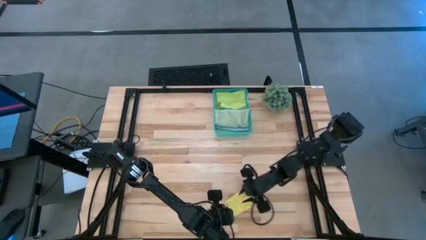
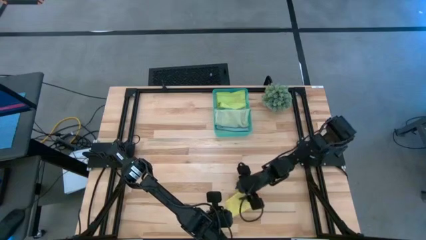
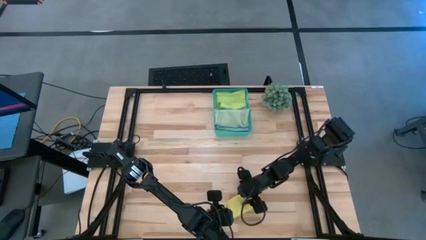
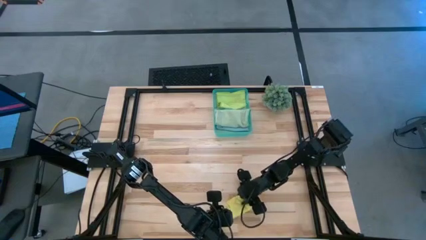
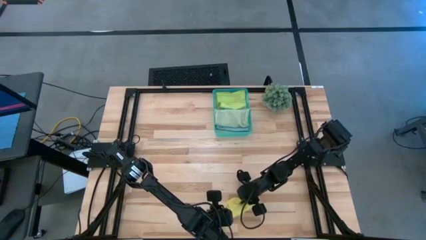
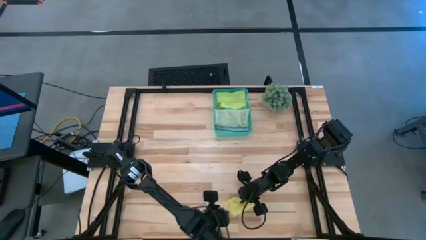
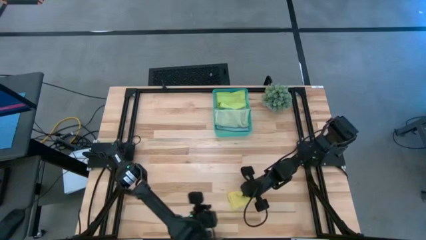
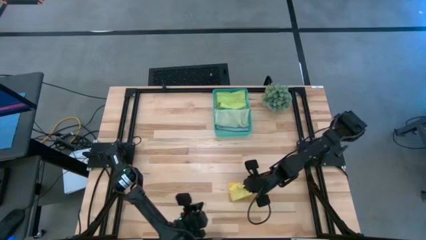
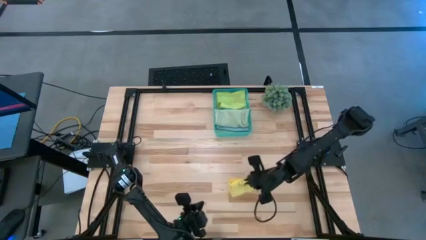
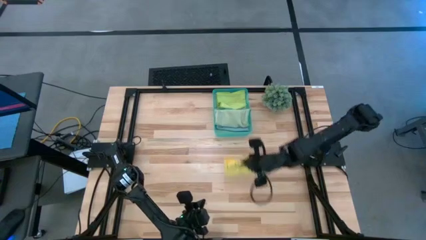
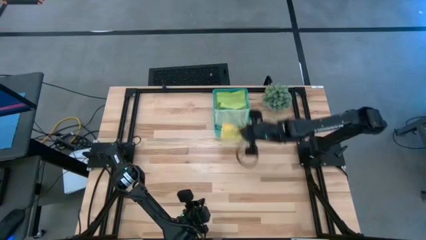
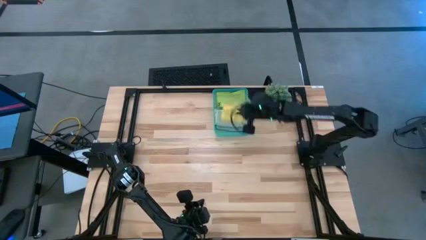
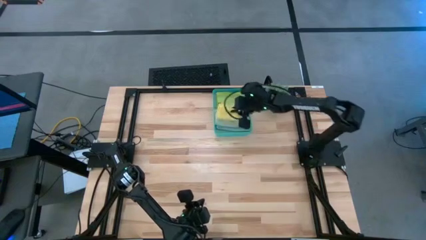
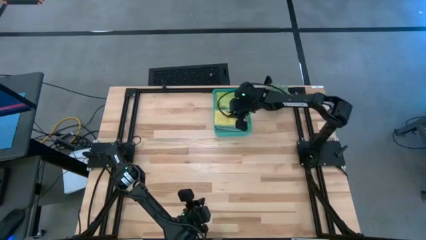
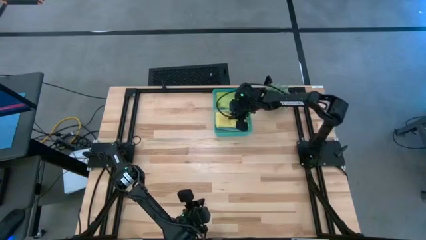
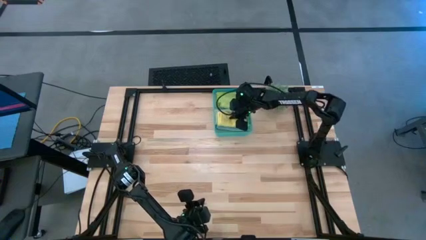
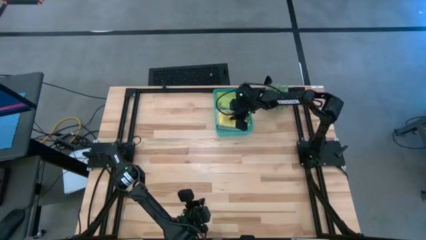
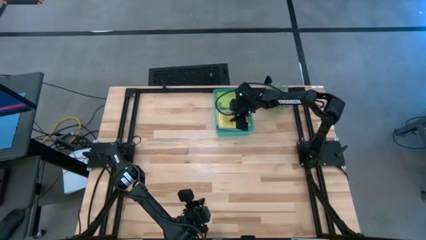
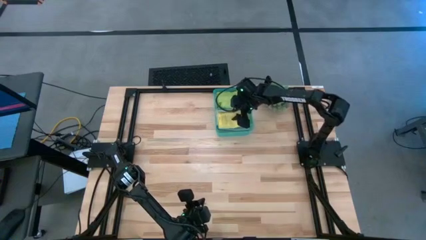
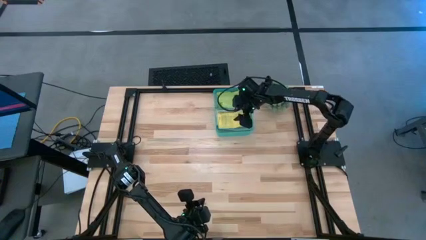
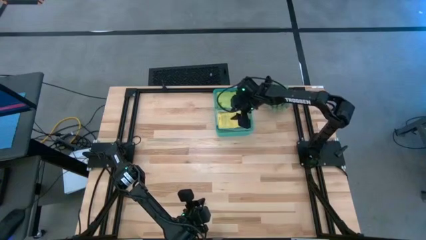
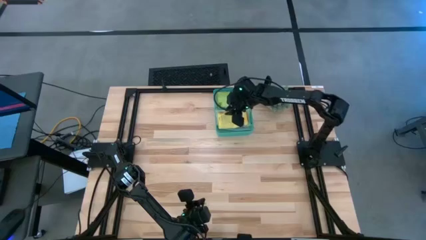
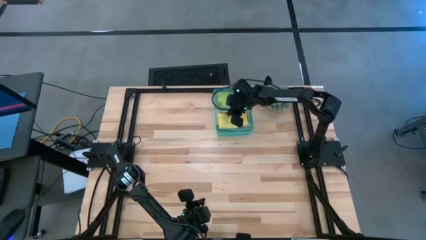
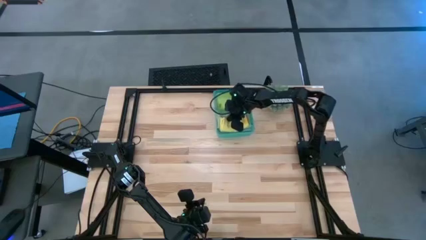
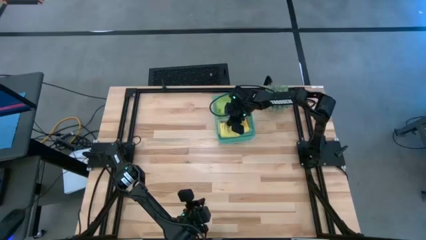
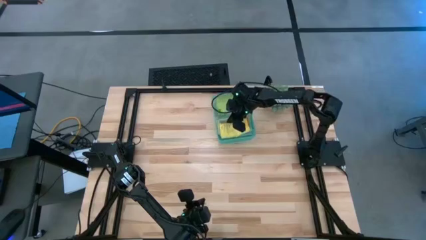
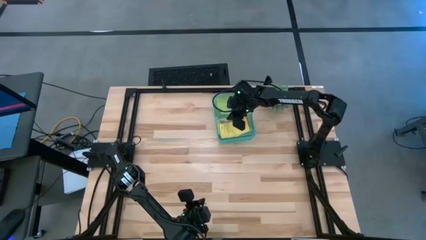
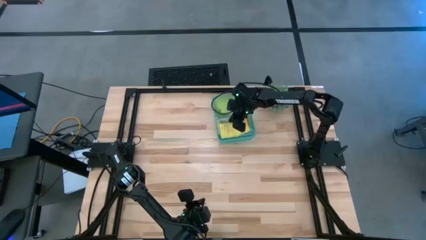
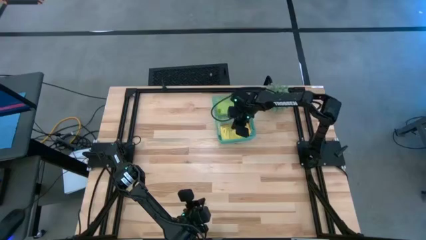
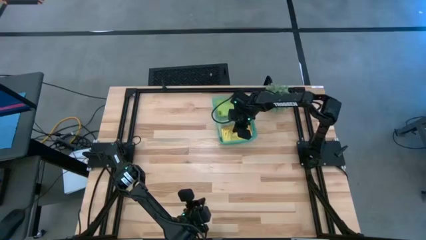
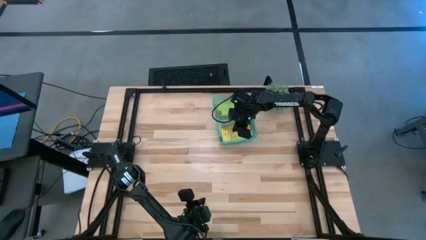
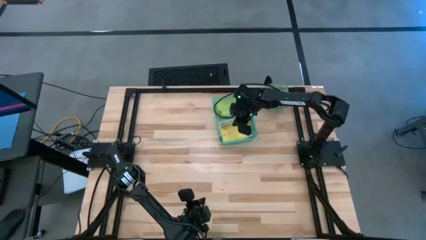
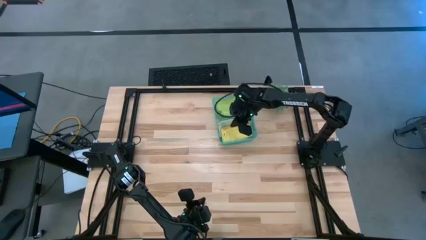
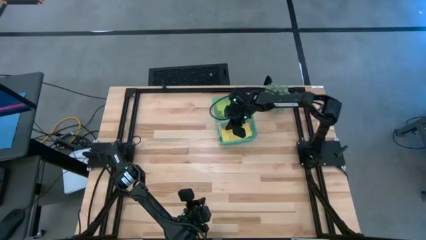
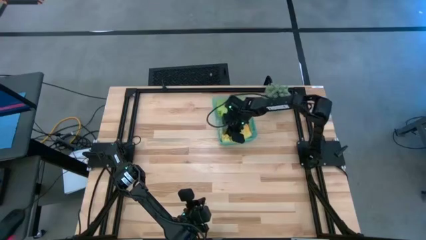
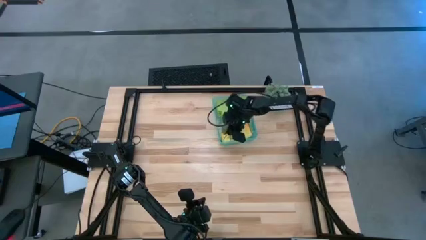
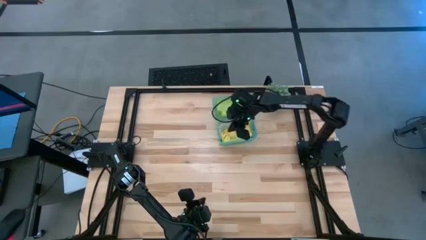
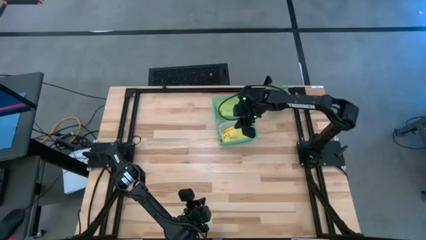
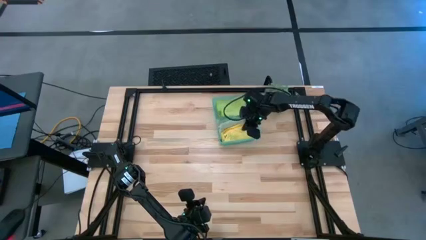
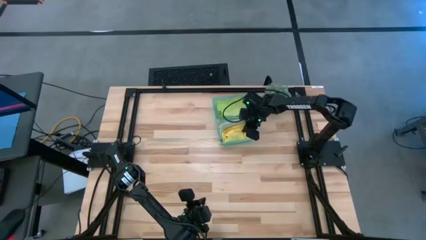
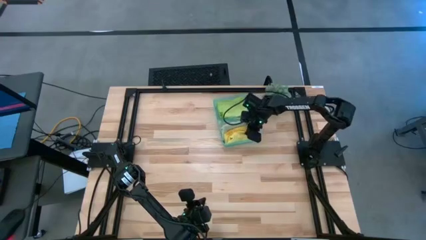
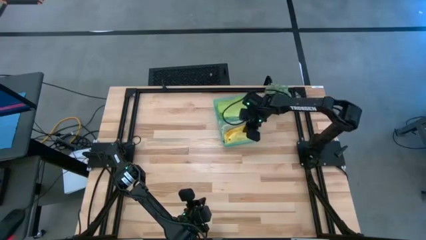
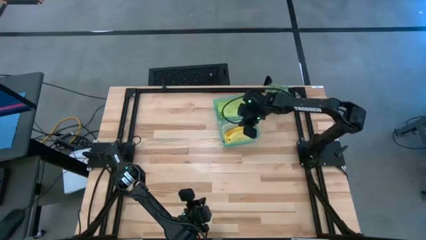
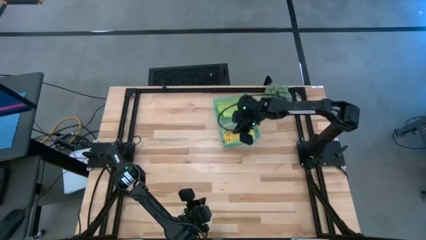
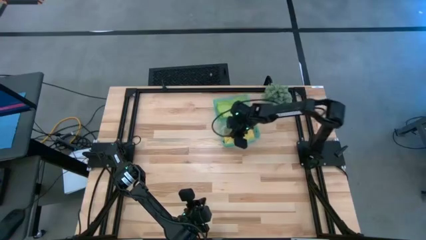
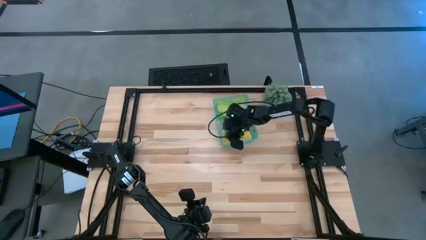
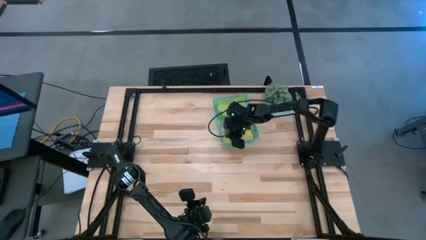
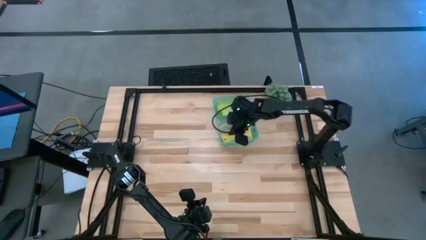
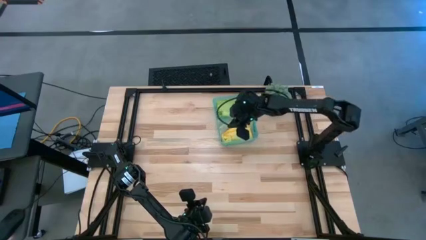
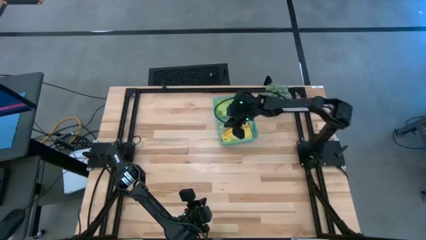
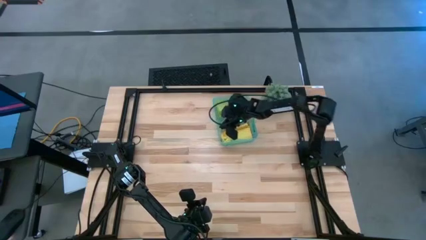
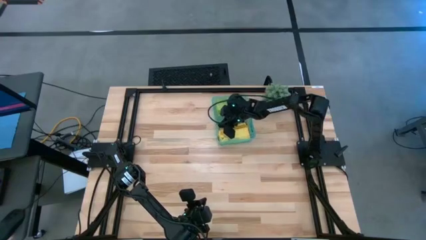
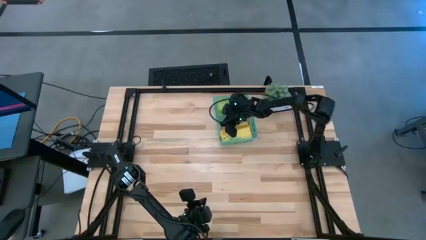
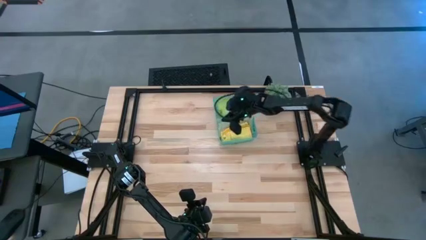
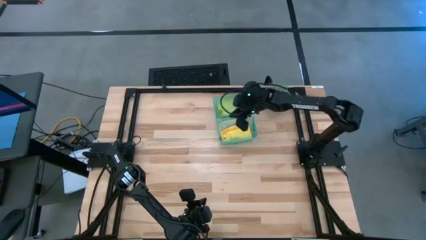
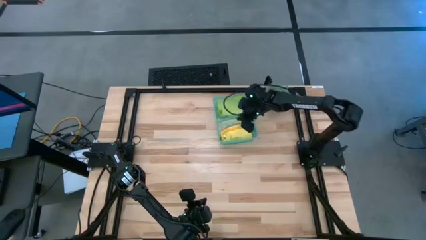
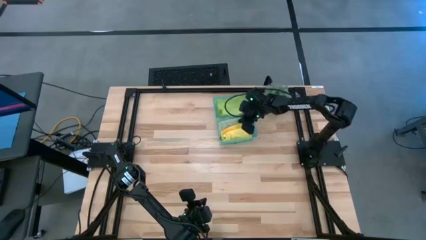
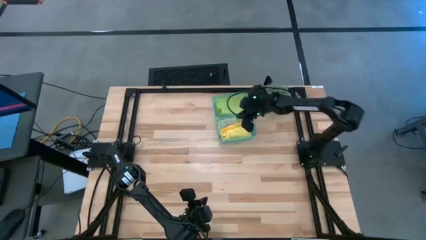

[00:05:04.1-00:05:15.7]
Task: Fold microfiber towels
Put the yellow microfiber cloth into the green bin

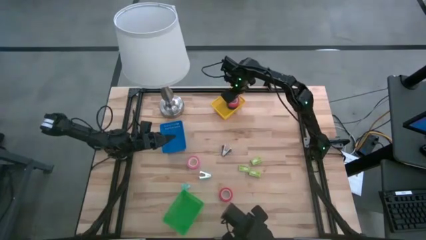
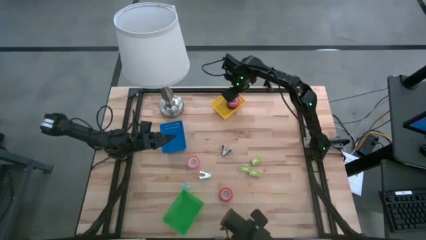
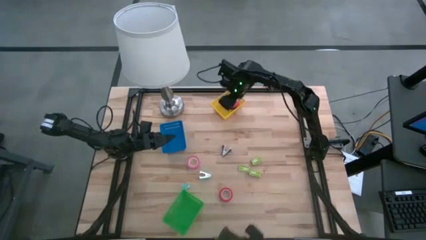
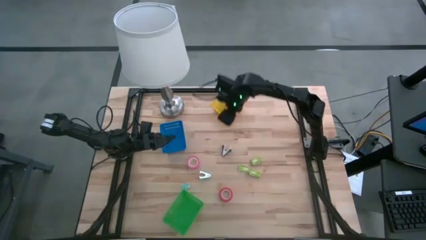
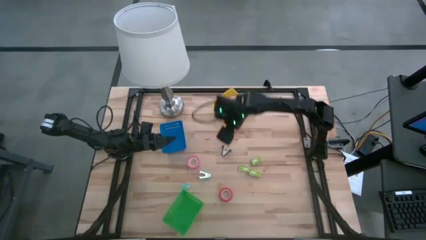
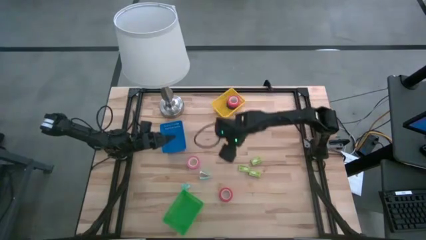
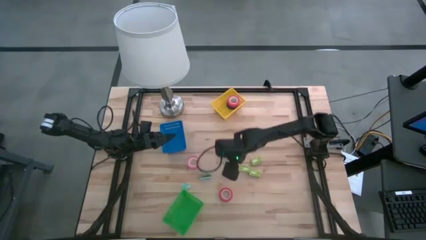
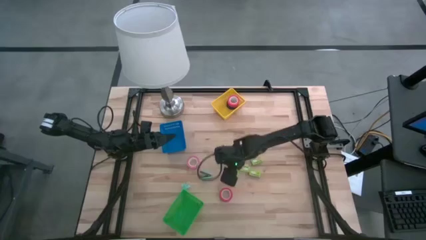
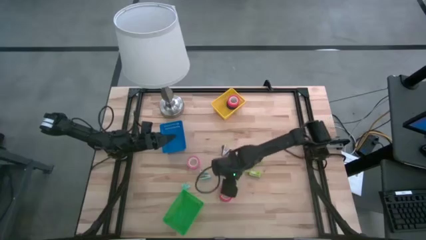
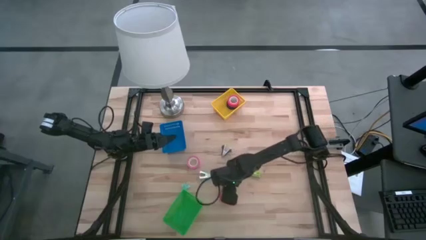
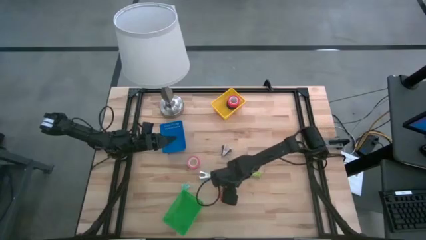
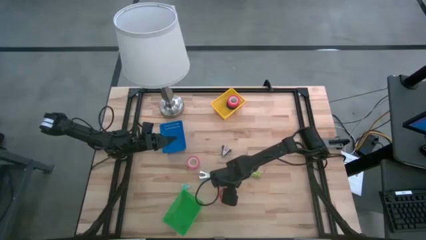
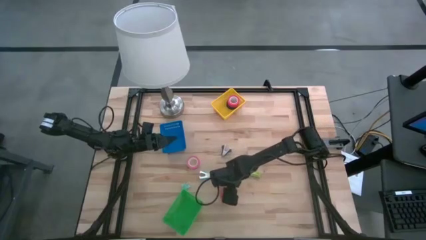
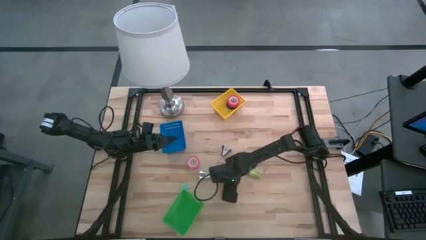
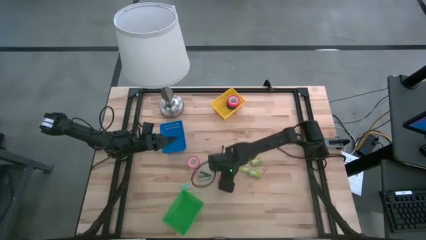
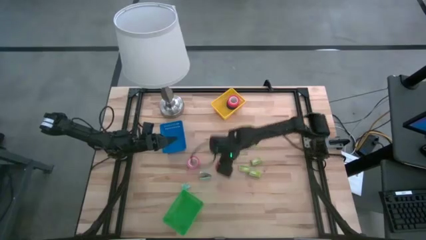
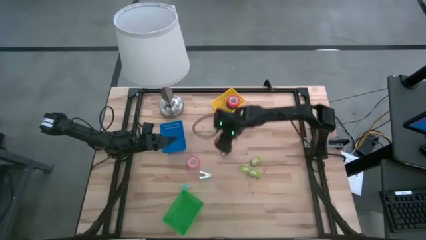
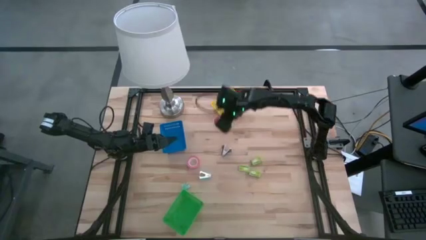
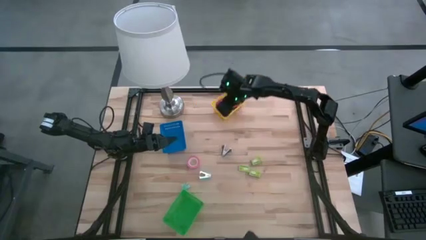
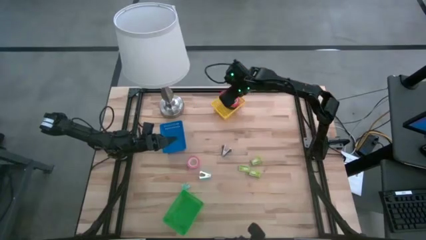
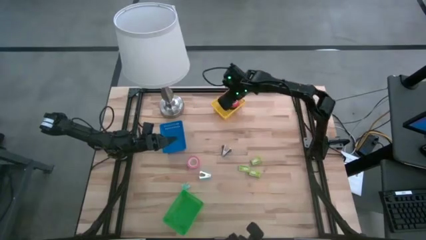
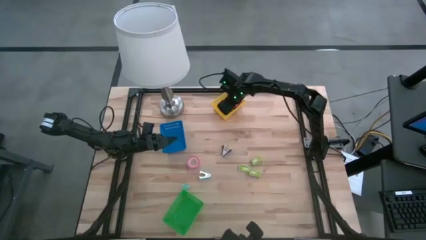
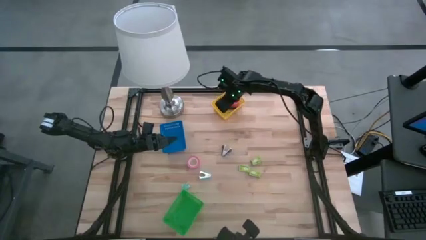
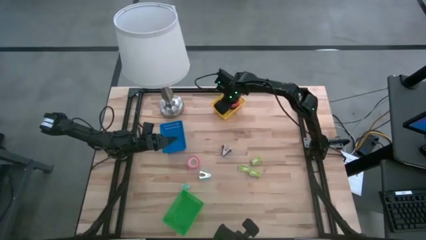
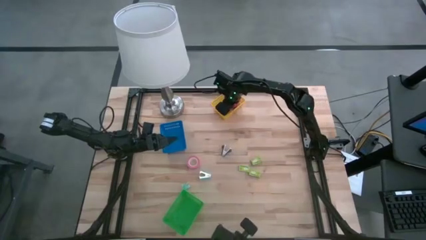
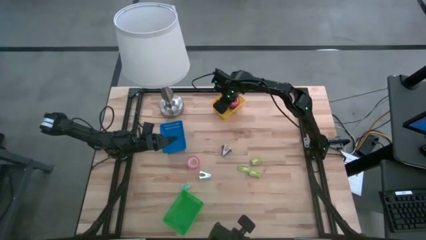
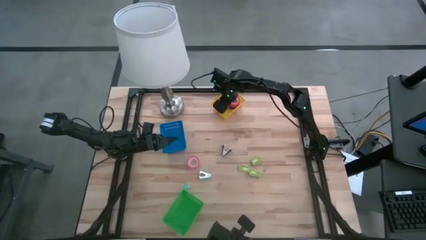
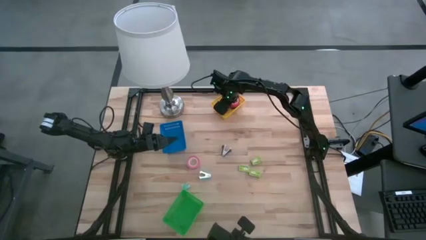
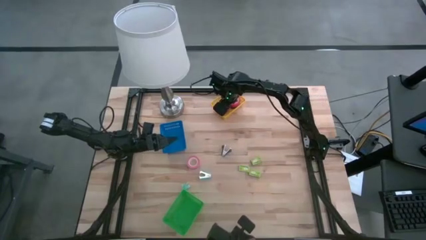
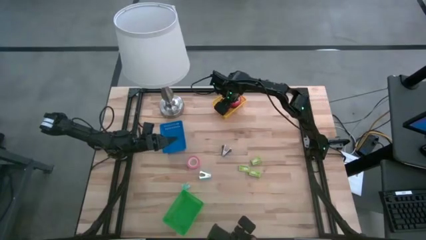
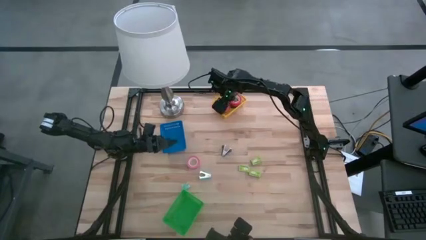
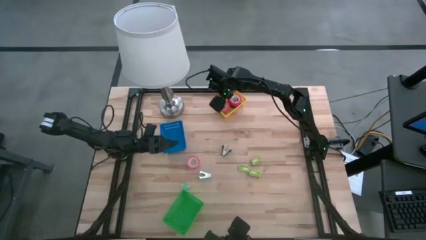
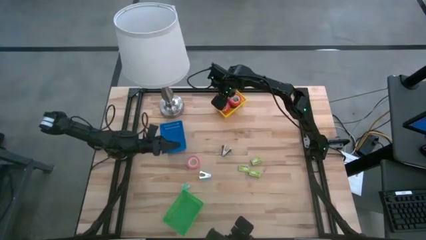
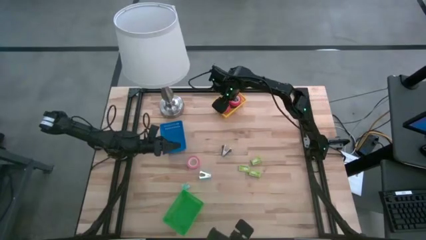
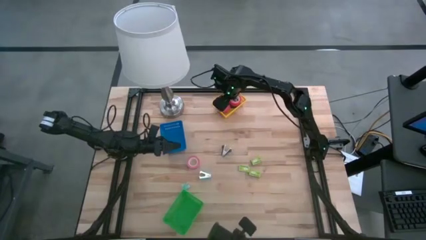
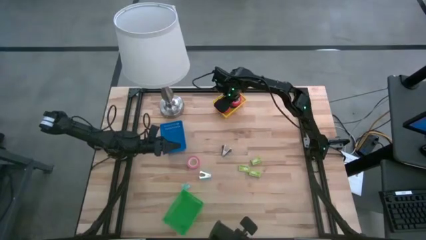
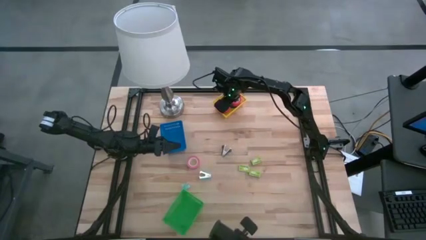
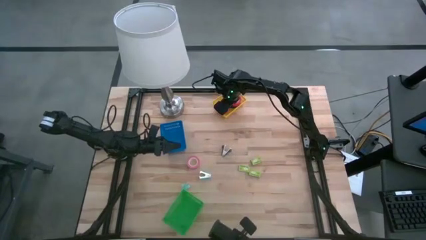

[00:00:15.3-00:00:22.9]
Task: Pick and place Stapler, Stapler remover, tape
Put the red tape into the yellow bin
